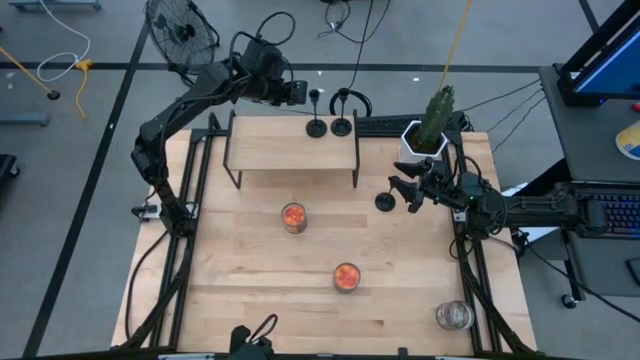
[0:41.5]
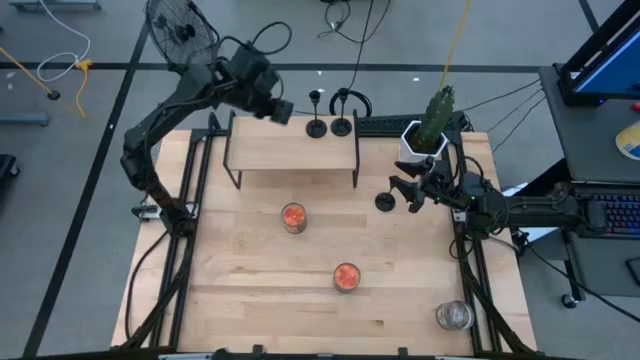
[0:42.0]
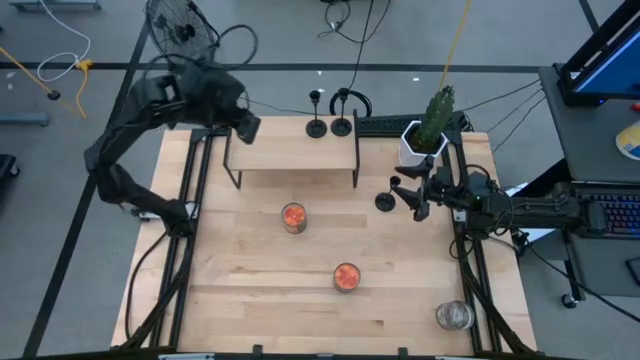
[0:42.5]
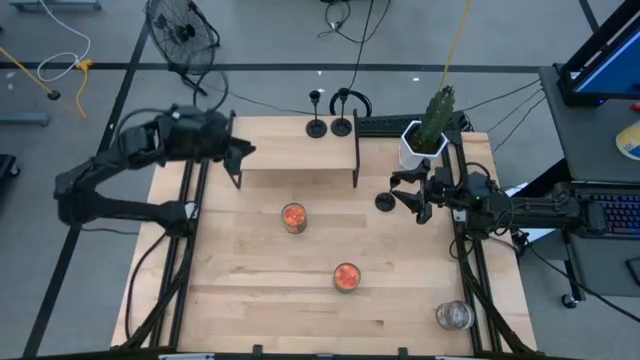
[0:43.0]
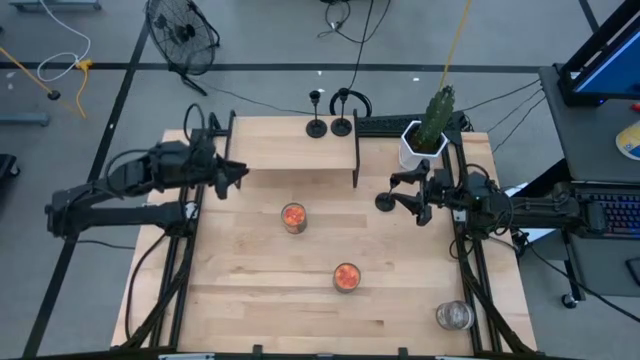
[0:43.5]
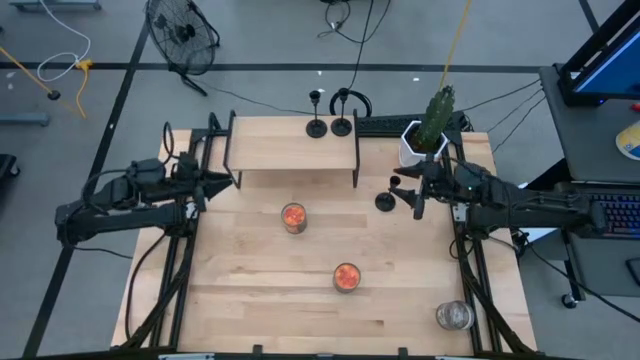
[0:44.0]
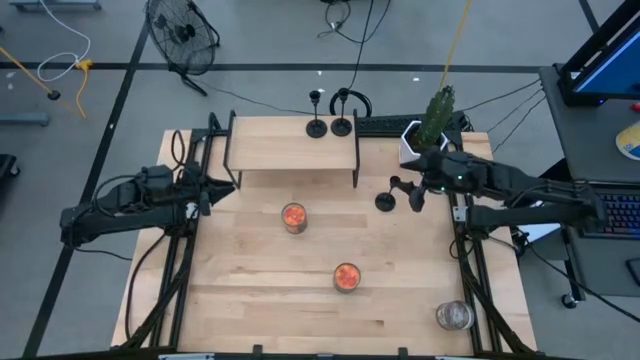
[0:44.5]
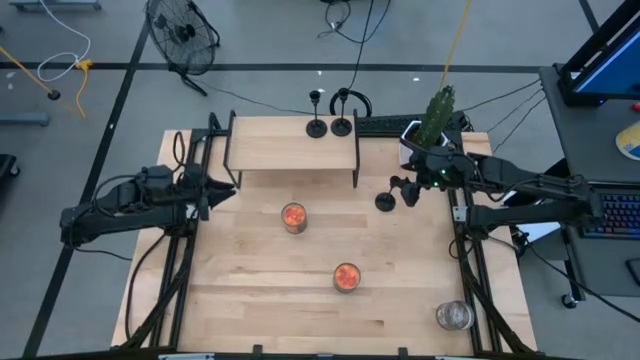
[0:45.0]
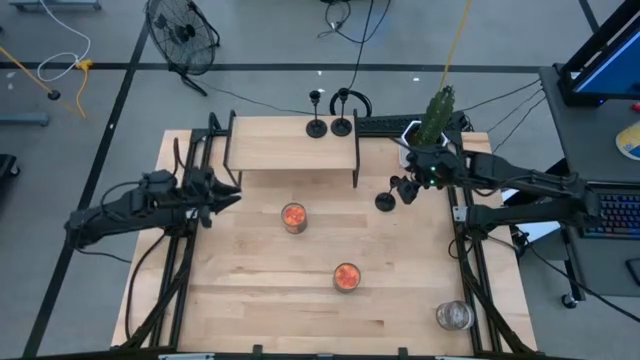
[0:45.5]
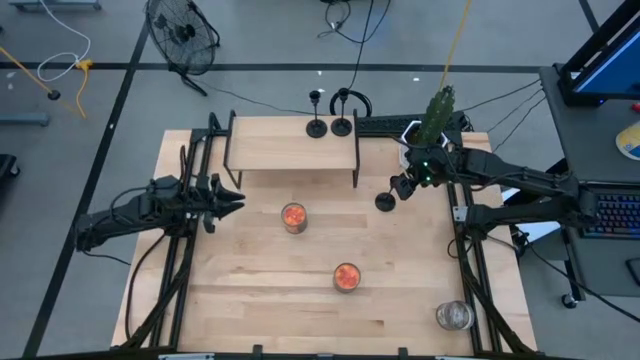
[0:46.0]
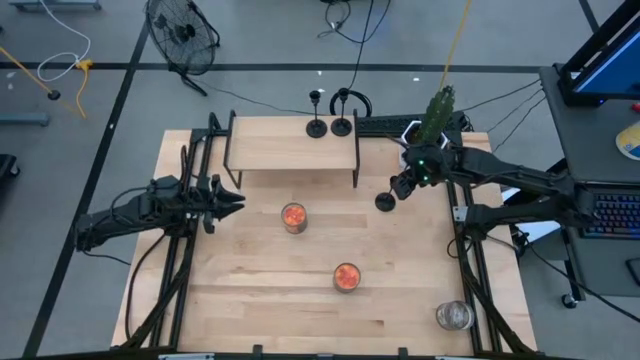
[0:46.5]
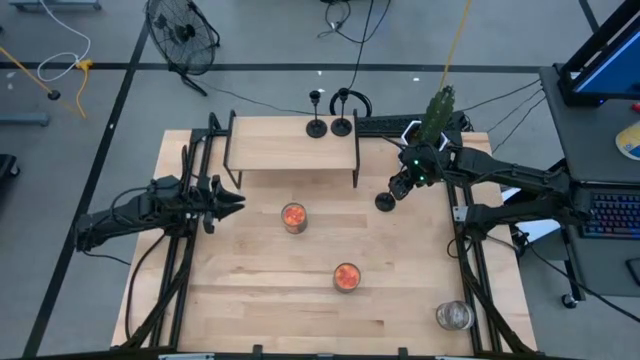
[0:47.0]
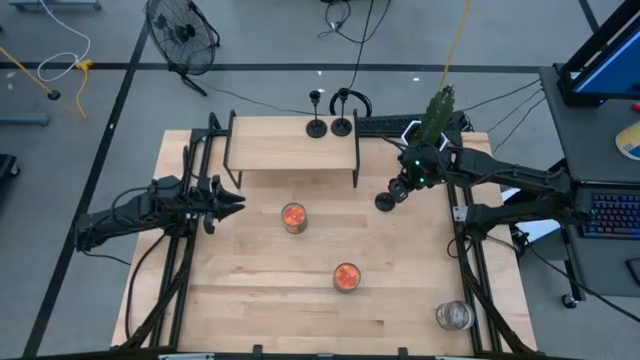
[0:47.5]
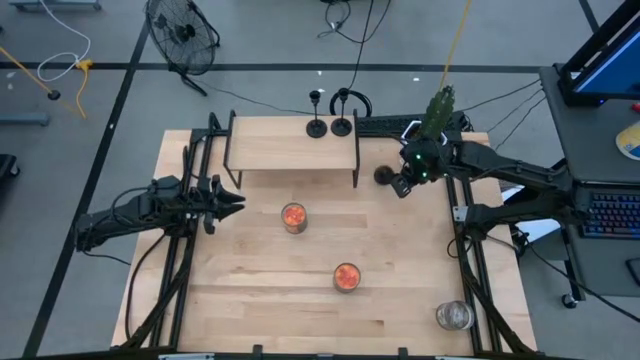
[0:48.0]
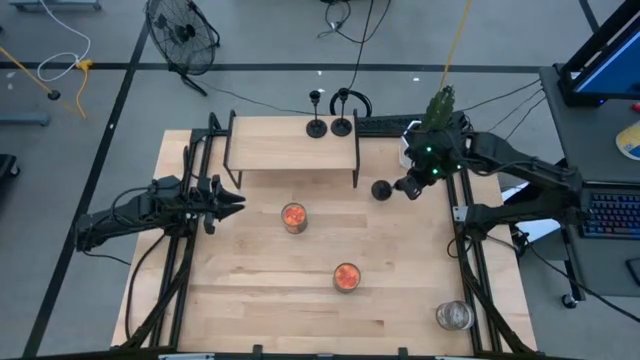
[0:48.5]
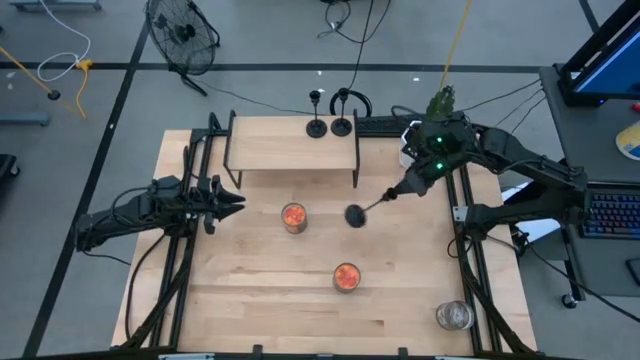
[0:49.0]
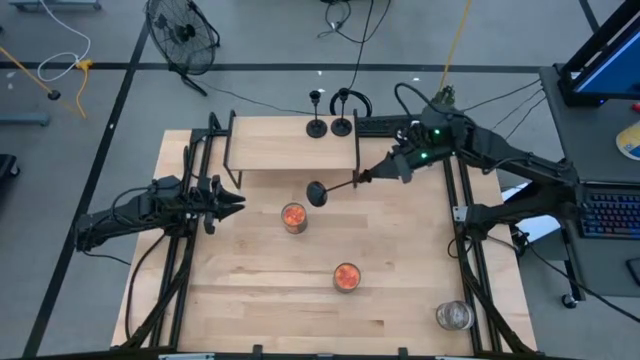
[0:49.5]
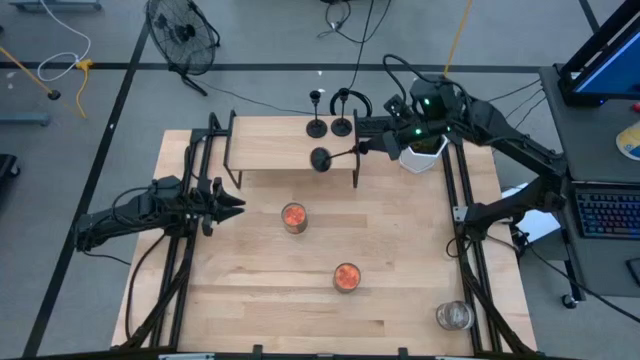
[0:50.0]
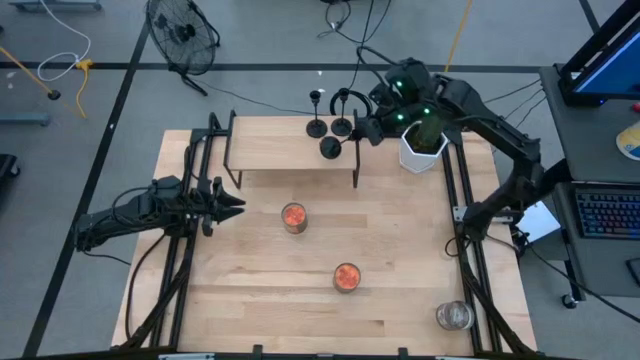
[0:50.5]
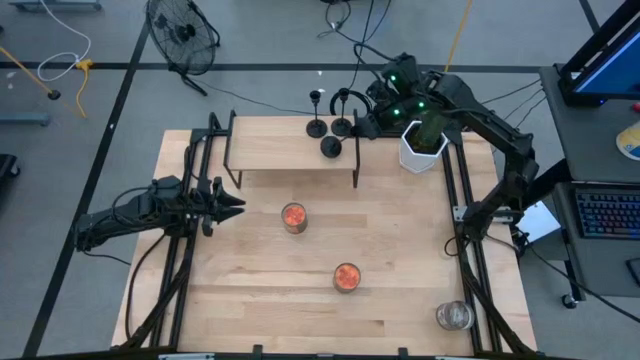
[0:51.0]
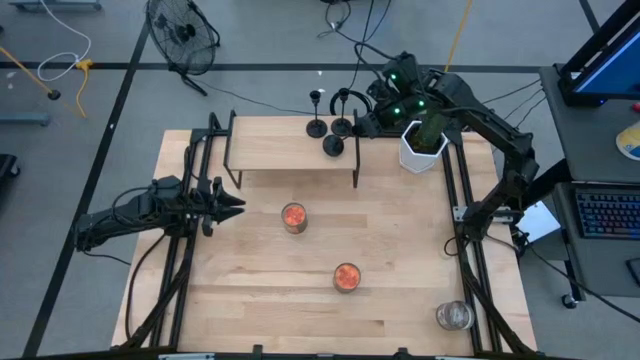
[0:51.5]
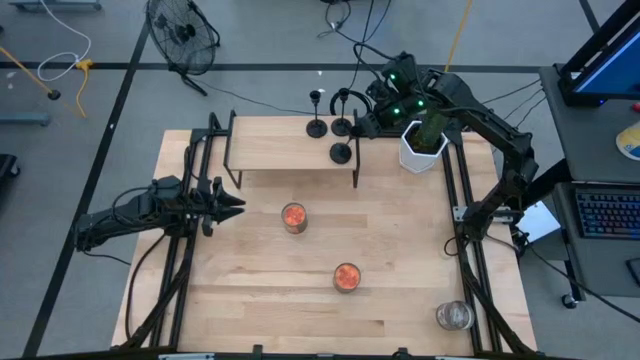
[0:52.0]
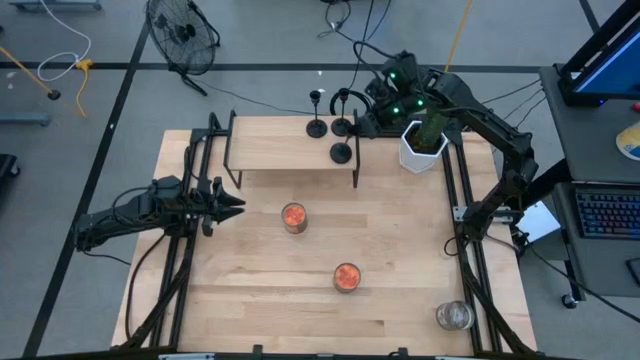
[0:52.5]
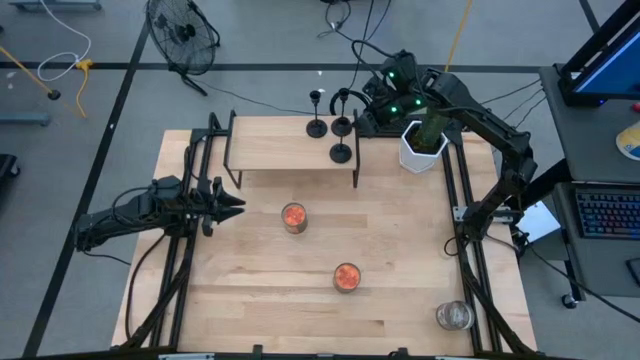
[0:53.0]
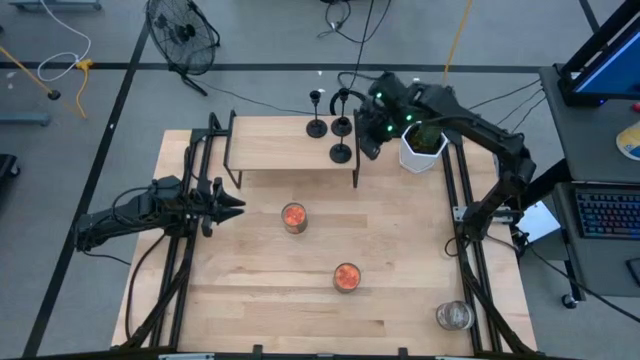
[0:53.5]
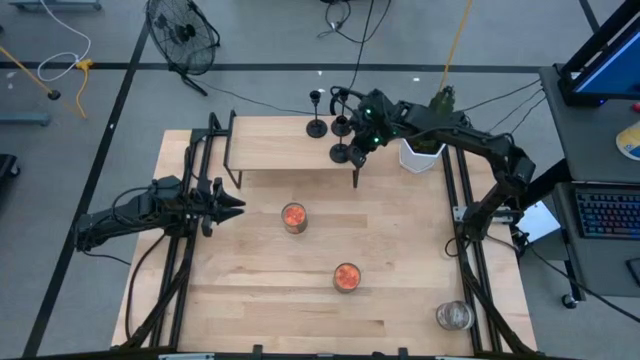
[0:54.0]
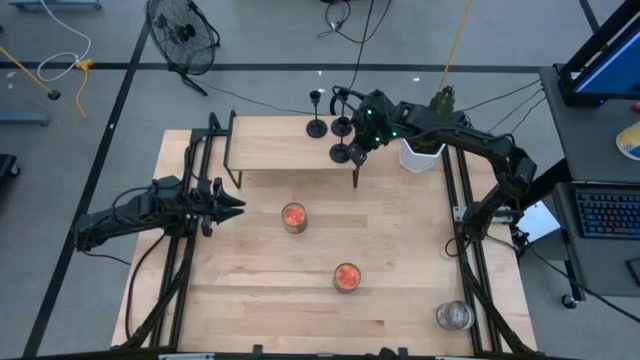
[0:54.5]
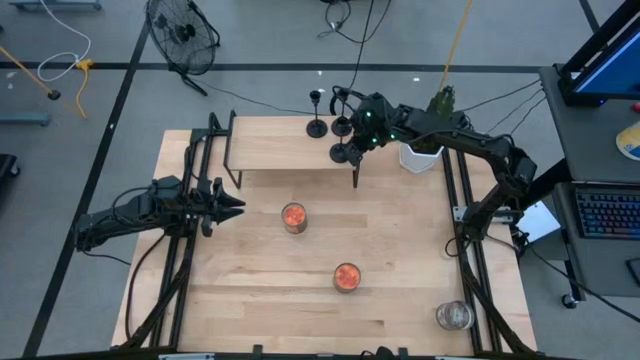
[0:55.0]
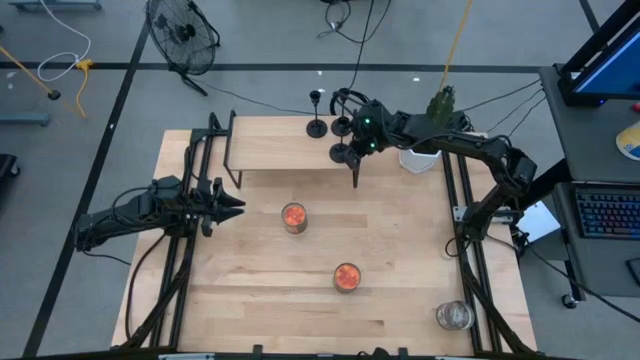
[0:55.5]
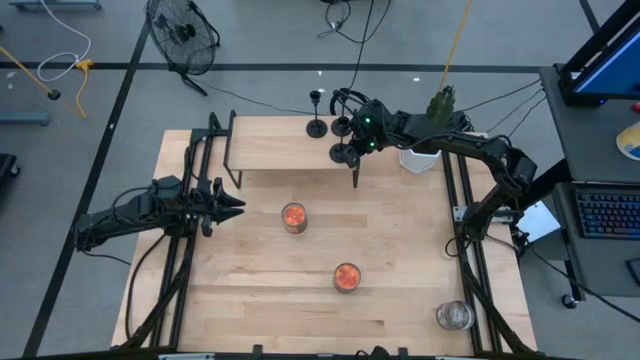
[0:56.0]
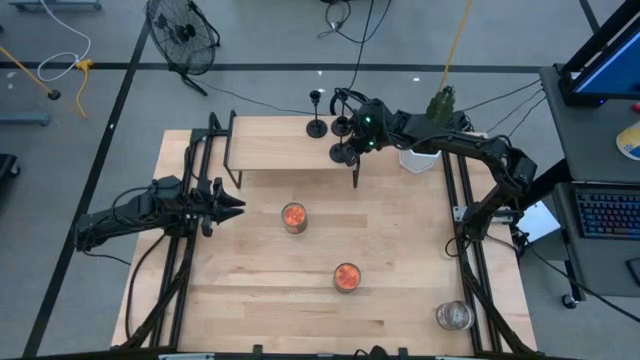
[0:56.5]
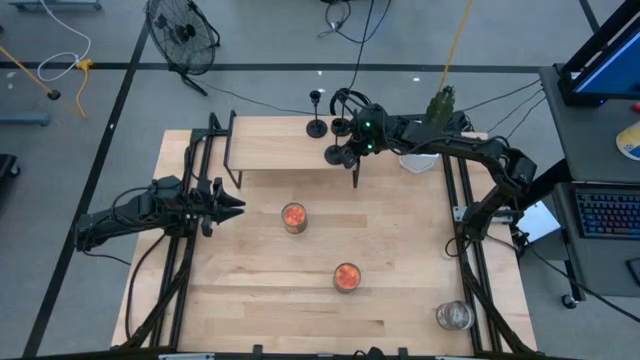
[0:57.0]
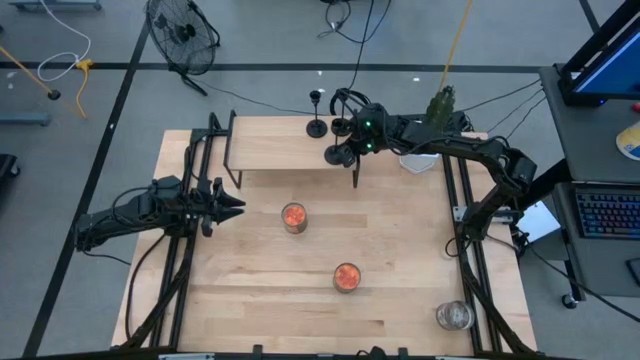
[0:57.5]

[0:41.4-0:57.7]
Task: Pick & Place candle stick holders
Put the candle holder on the shelf

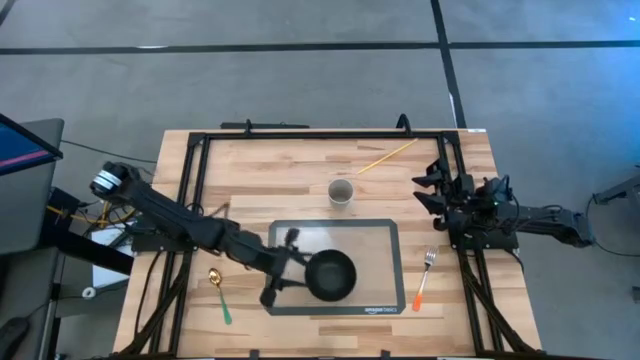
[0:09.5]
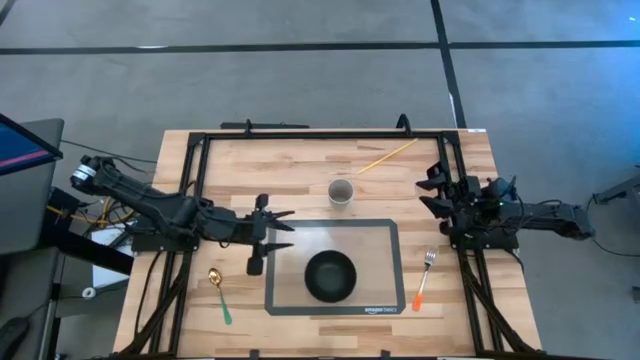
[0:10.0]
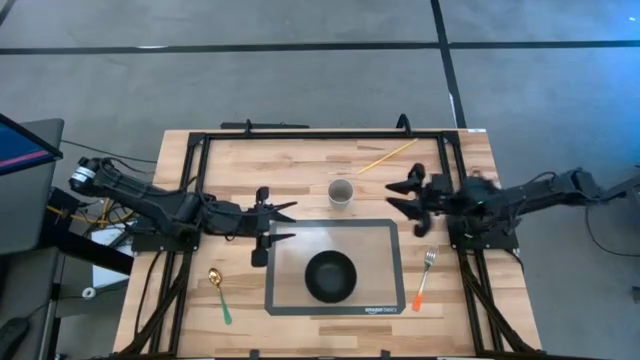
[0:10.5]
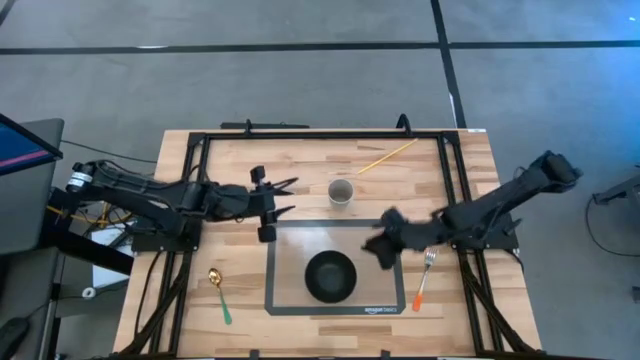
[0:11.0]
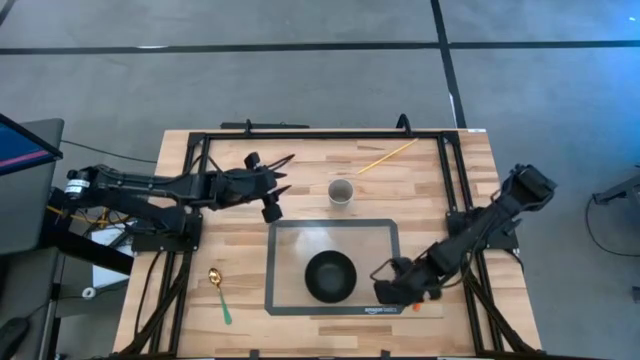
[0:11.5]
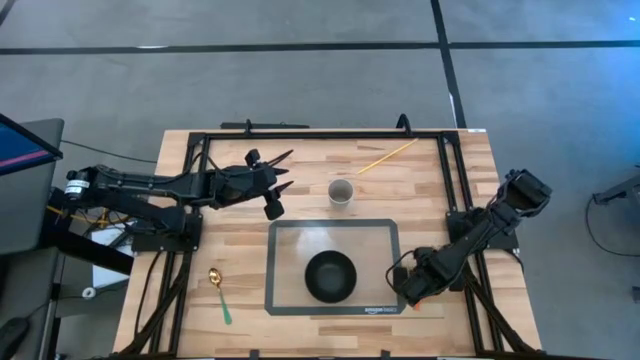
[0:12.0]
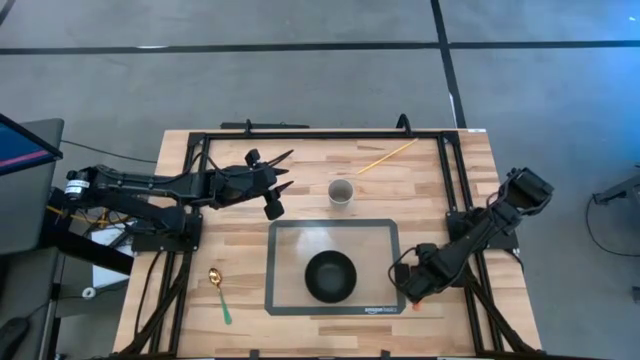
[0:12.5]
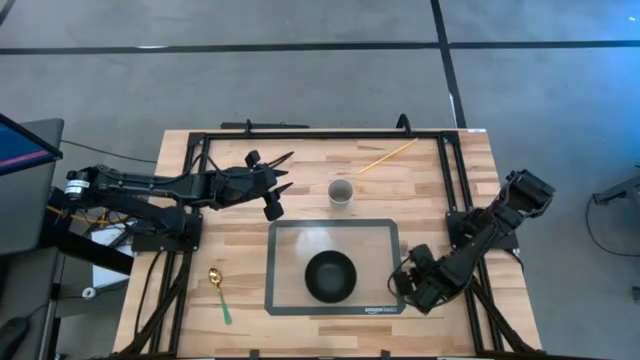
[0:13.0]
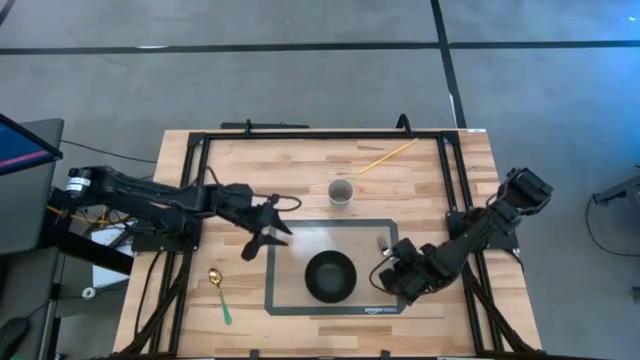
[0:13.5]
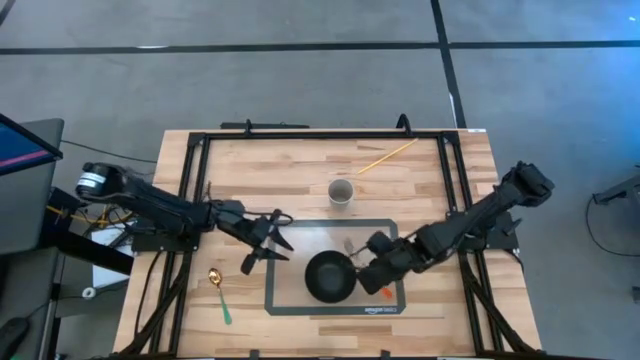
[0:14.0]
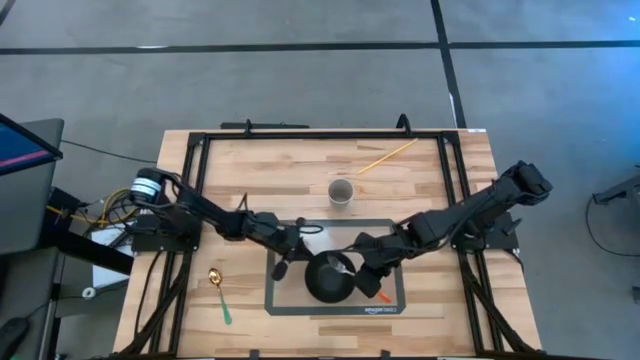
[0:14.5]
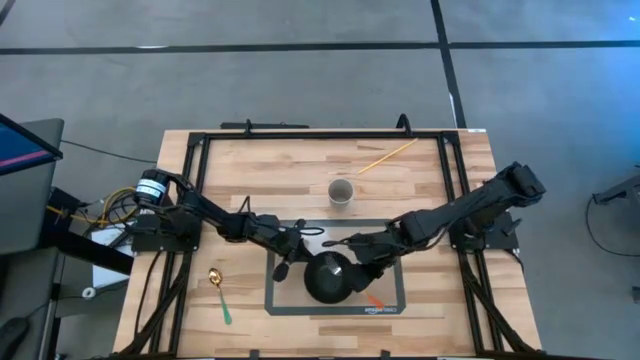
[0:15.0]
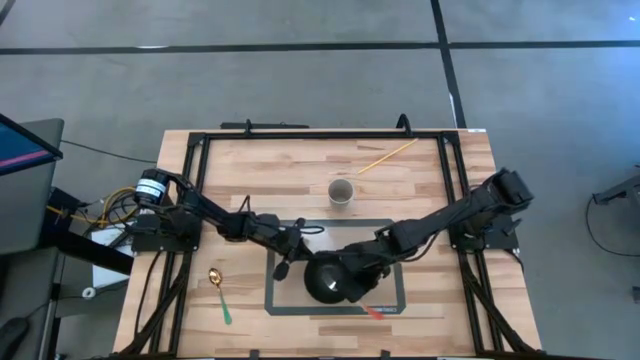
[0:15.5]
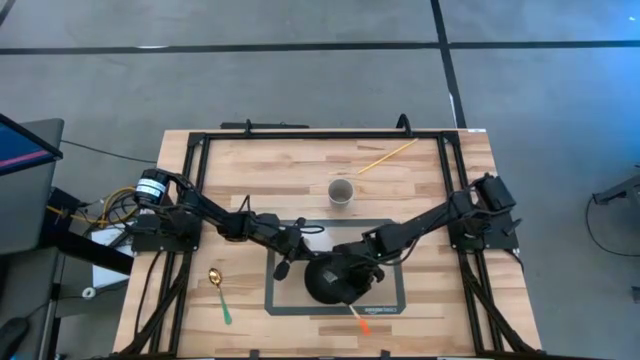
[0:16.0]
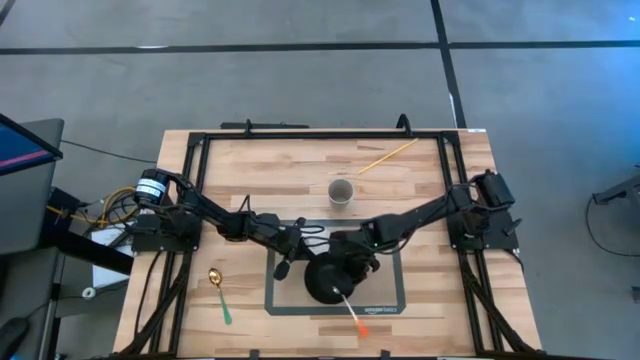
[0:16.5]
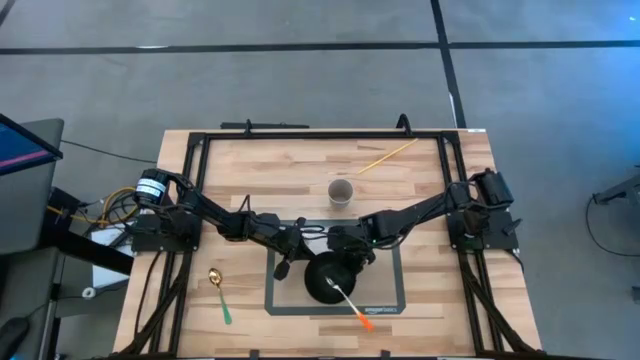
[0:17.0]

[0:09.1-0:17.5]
Task: Pick & Place Utensil
Put the orange fork into the black bowl on the transparent mat
